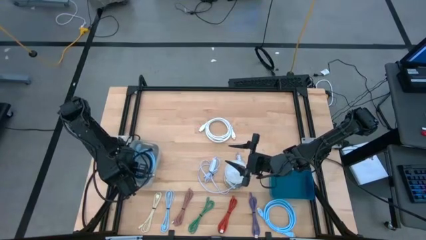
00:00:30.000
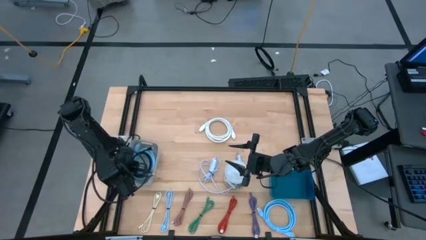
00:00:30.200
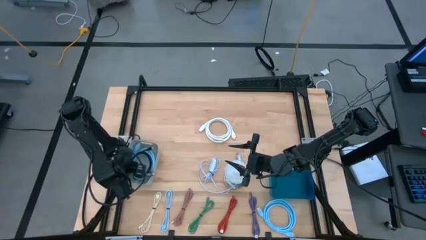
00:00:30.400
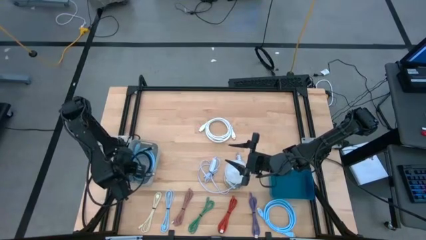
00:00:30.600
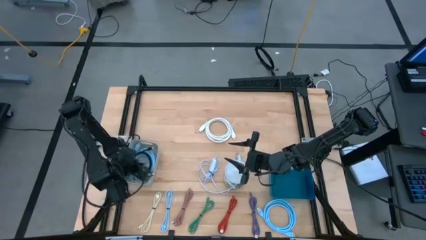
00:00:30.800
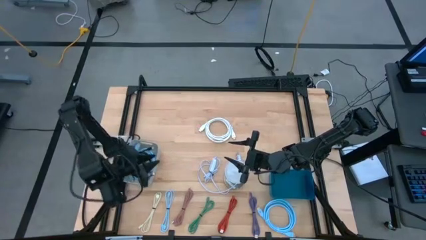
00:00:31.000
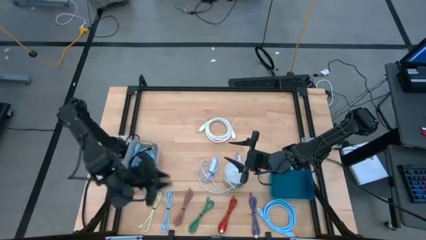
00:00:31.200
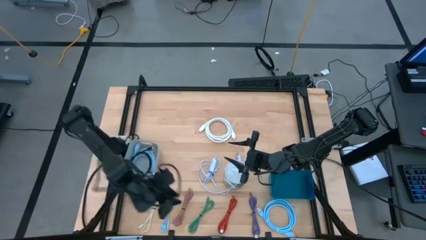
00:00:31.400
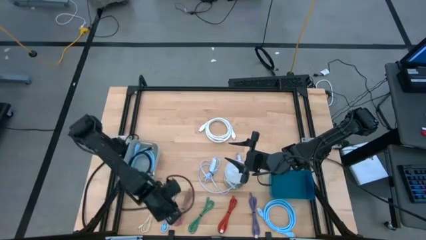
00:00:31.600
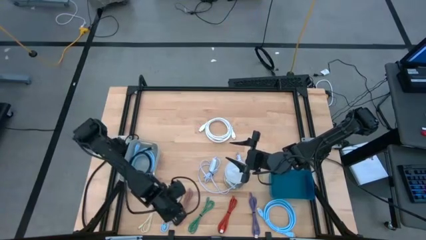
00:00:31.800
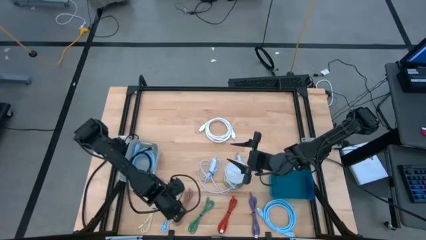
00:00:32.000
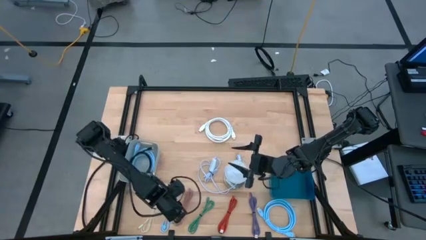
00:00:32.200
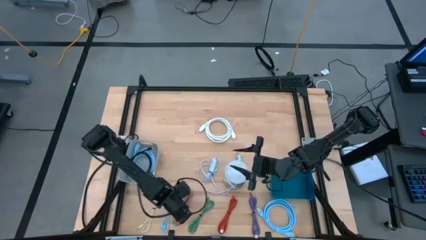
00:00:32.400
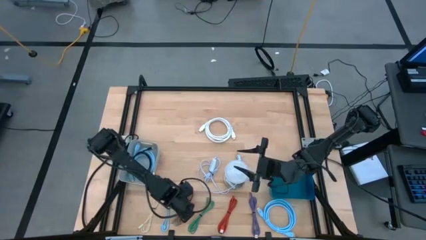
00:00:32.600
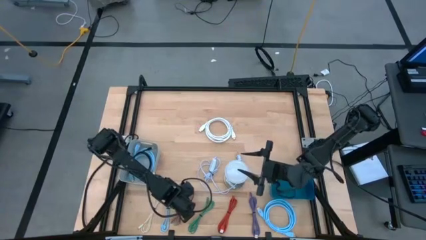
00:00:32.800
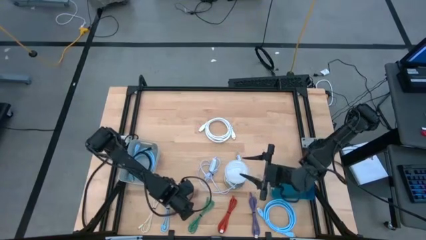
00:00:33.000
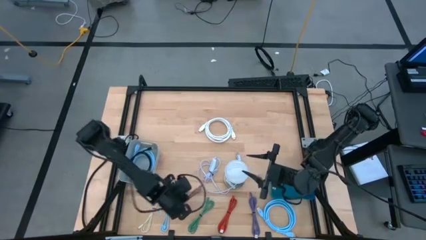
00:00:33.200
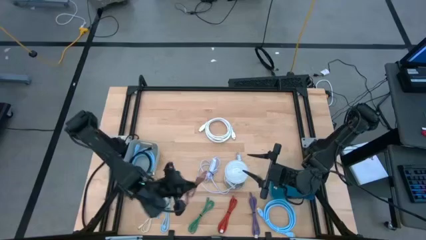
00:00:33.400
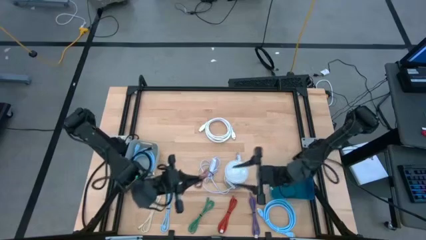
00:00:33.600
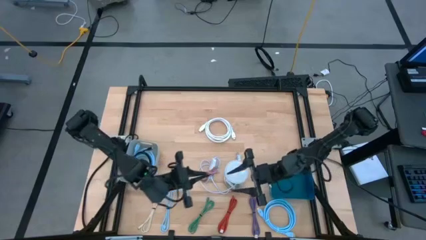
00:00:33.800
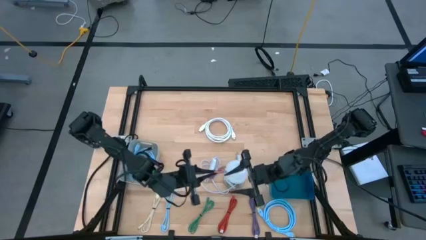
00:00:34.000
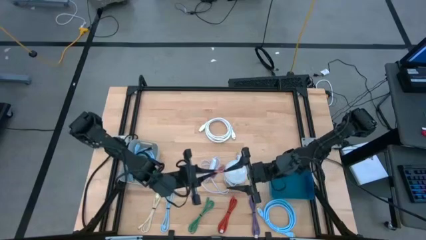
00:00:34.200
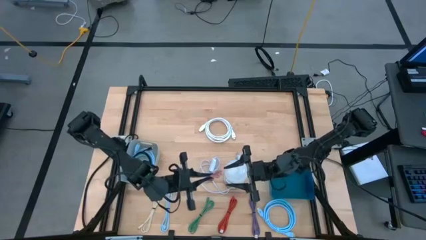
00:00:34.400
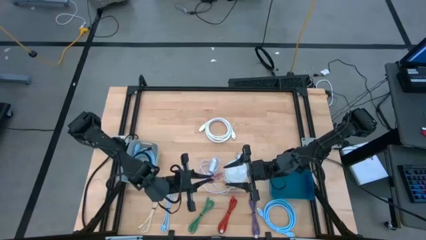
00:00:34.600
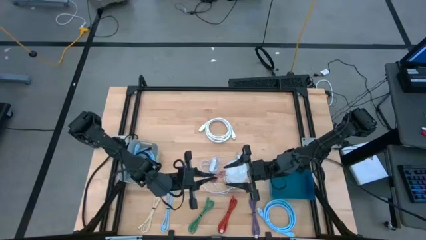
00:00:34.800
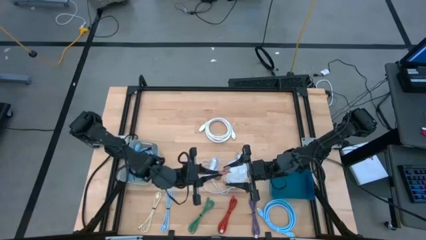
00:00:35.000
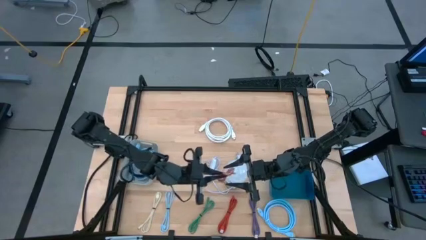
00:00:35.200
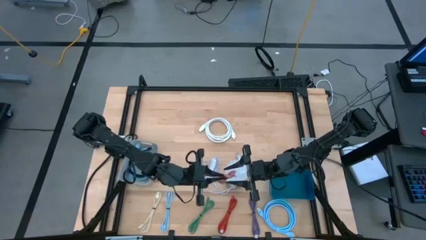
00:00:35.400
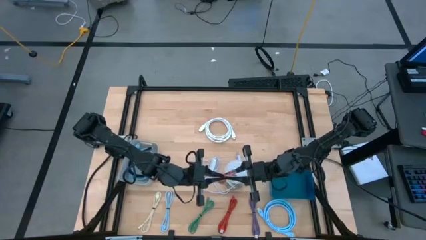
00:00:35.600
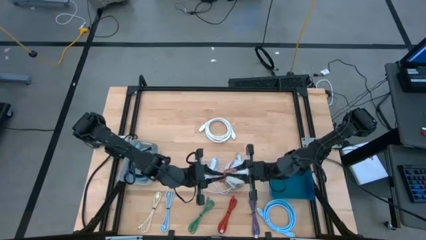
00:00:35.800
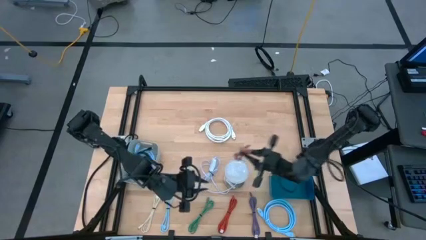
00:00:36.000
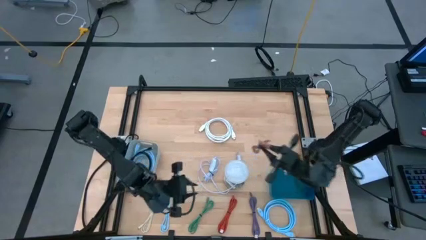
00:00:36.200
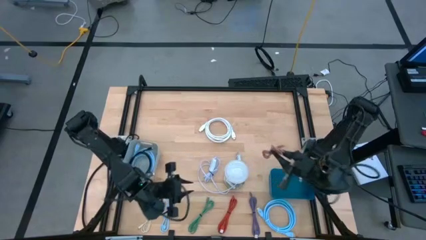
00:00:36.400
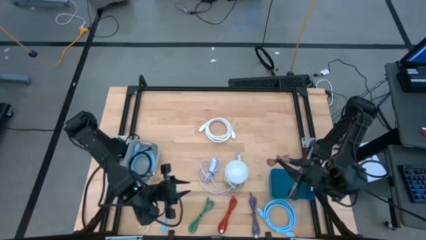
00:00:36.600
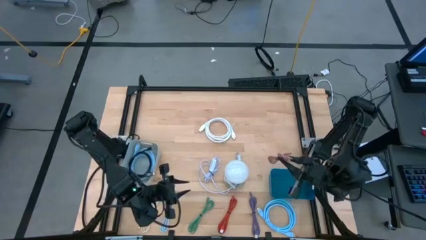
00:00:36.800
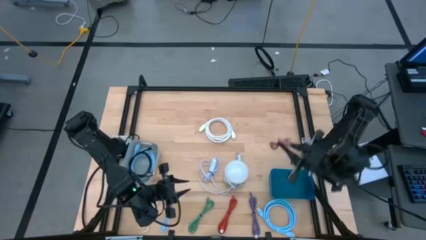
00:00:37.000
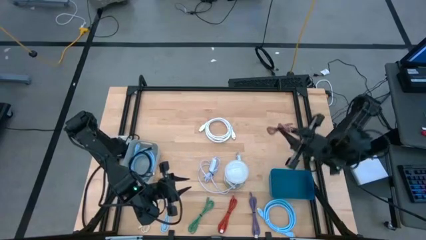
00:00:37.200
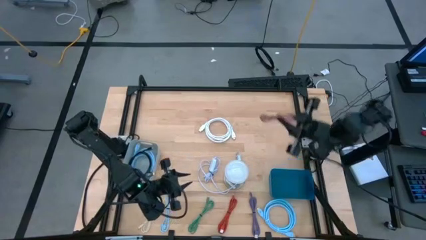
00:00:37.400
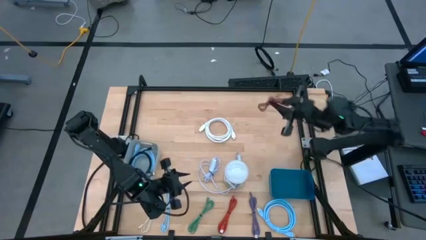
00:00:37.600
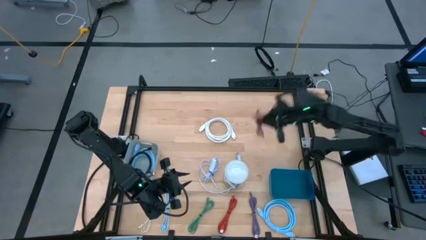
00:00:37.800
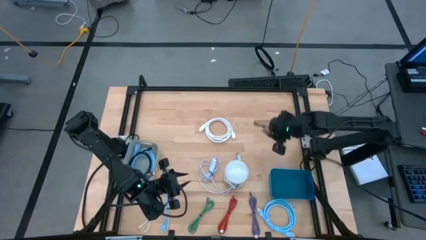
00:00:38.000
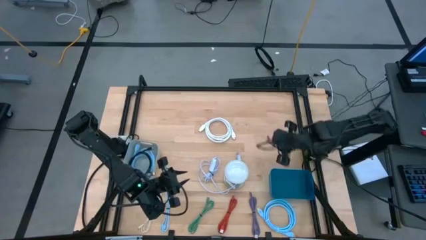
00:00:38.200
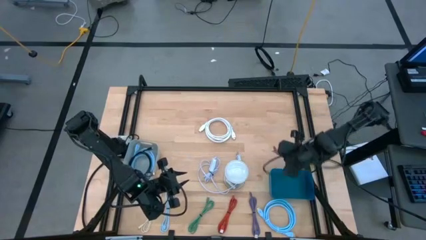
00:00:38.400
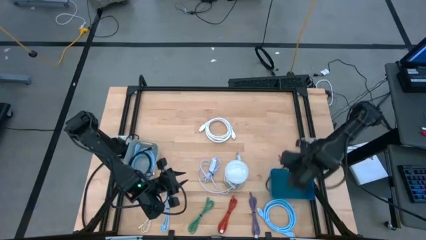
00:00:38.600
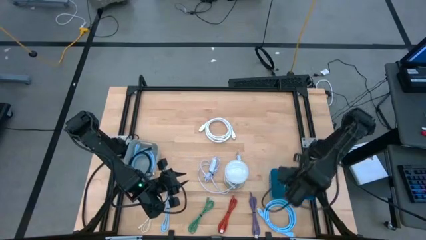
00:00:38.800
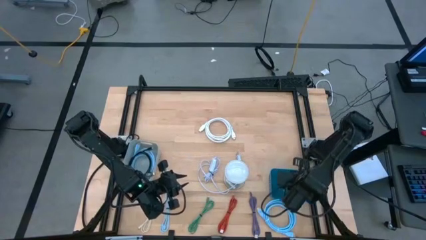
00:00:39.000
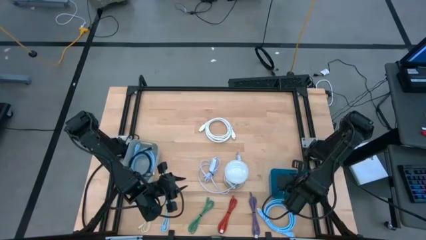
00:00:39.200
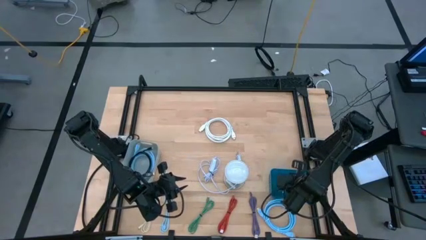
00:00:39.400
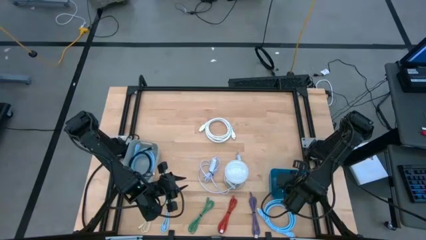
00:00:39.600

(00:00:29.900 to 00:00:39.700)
Task: Pick & Place USB Port
Put the pink USB cable into the blue bin

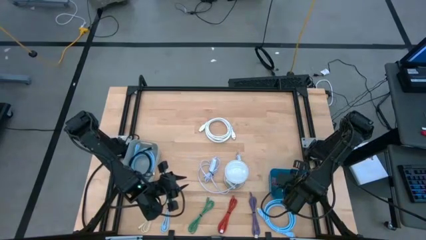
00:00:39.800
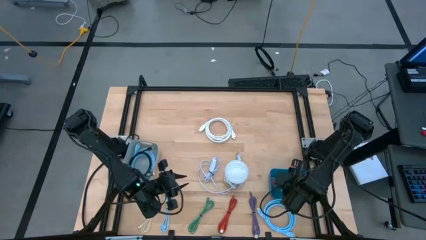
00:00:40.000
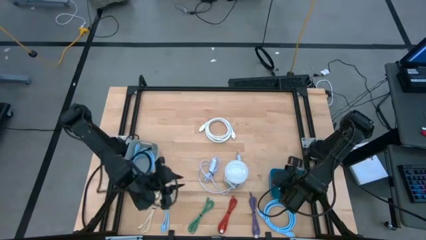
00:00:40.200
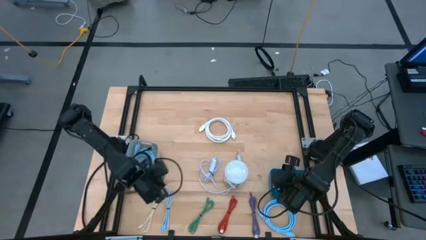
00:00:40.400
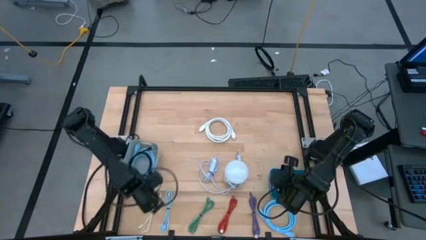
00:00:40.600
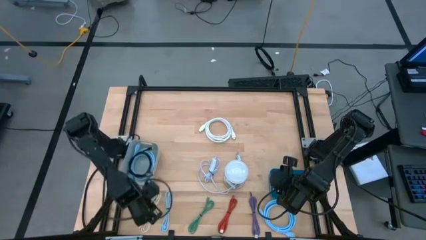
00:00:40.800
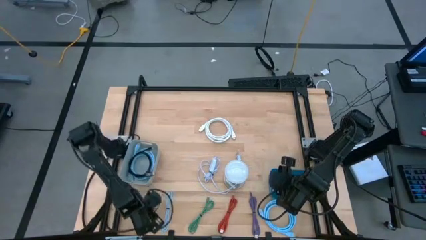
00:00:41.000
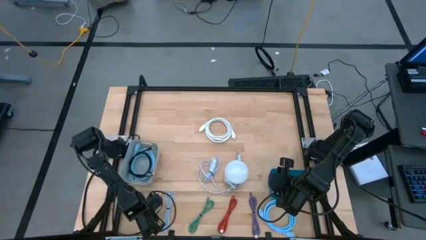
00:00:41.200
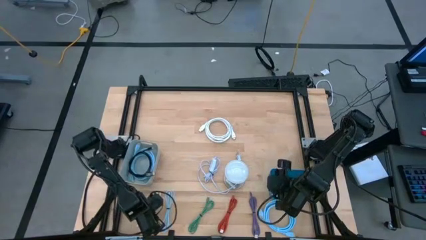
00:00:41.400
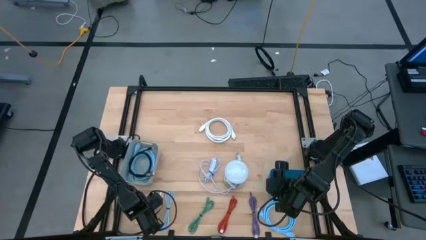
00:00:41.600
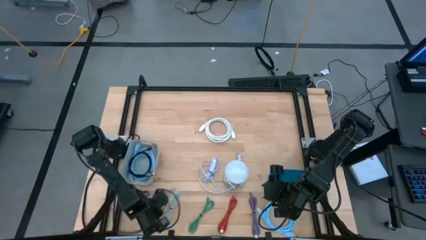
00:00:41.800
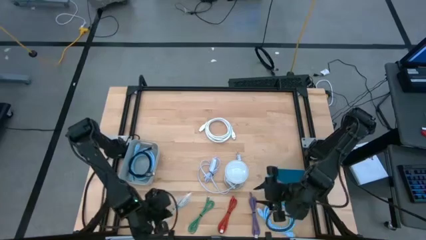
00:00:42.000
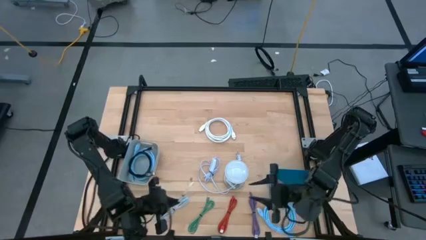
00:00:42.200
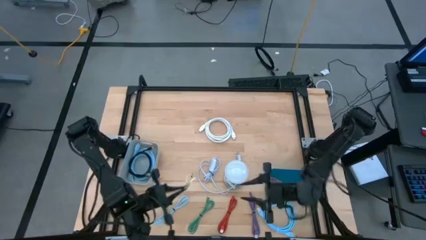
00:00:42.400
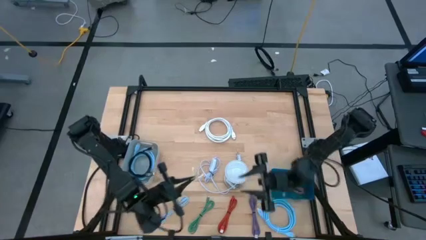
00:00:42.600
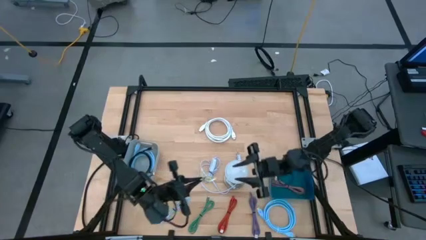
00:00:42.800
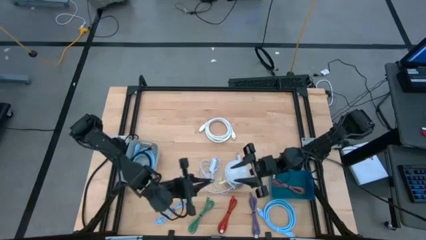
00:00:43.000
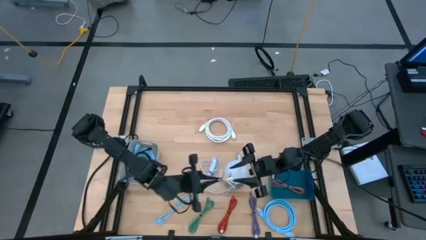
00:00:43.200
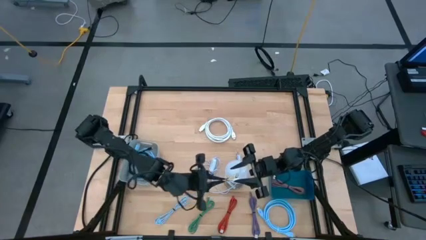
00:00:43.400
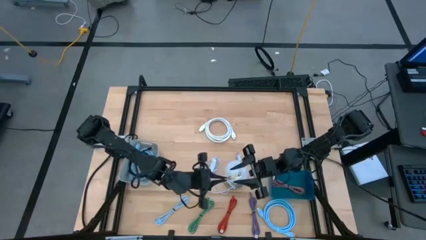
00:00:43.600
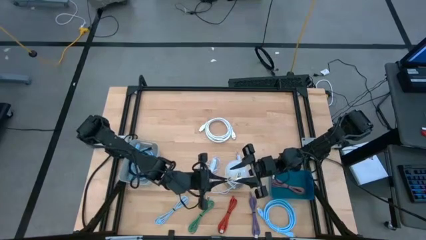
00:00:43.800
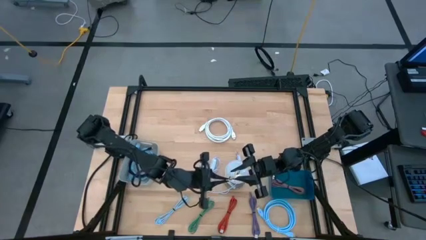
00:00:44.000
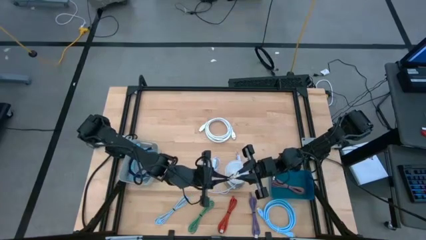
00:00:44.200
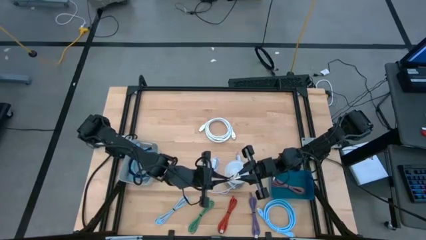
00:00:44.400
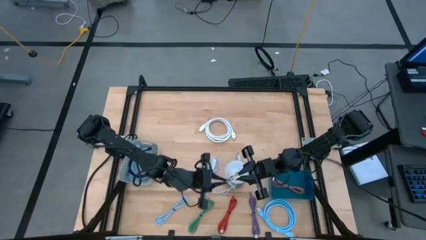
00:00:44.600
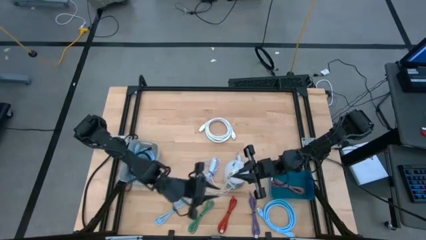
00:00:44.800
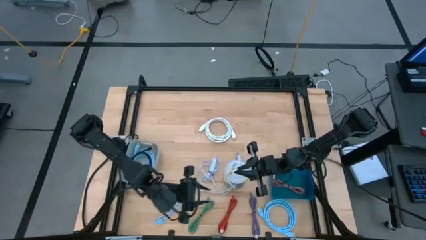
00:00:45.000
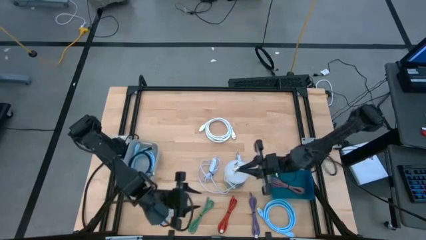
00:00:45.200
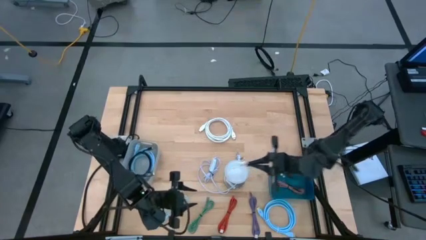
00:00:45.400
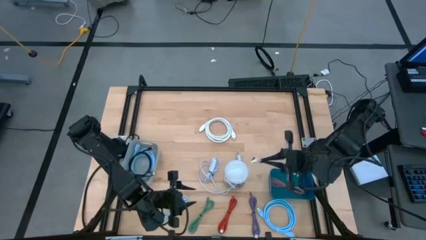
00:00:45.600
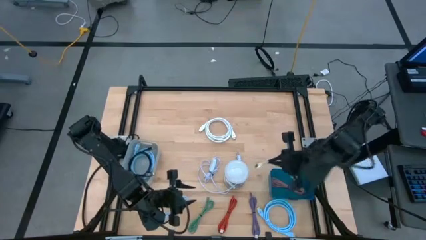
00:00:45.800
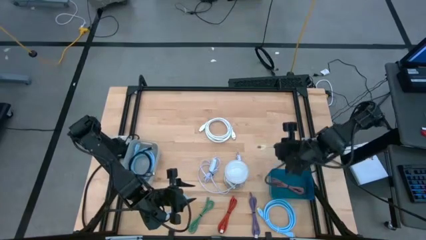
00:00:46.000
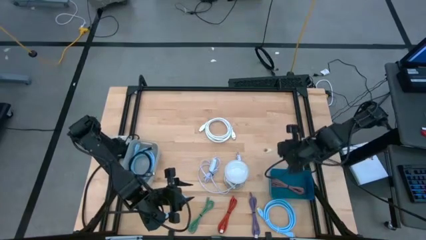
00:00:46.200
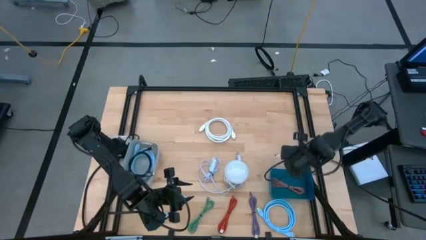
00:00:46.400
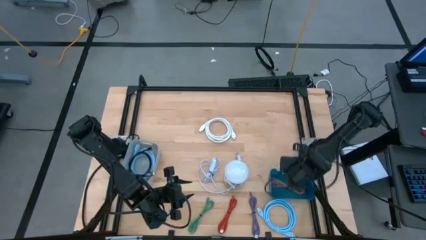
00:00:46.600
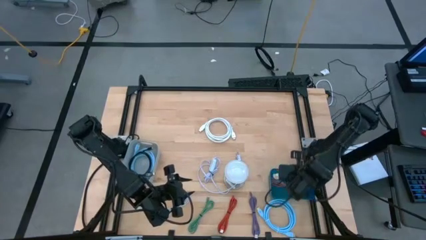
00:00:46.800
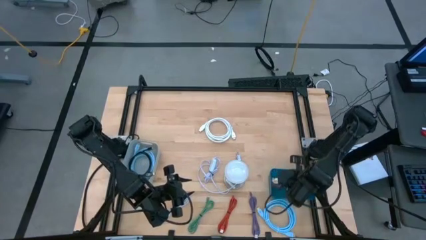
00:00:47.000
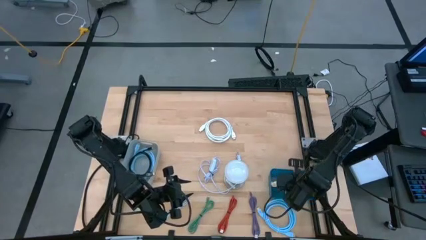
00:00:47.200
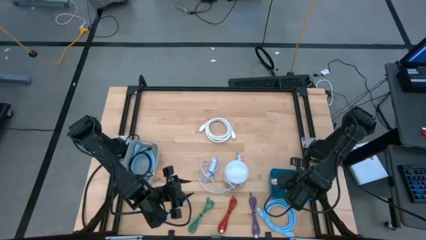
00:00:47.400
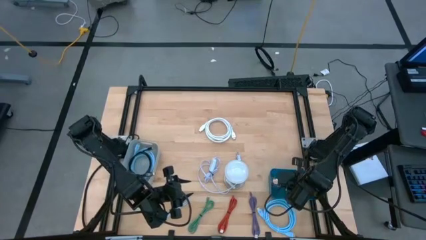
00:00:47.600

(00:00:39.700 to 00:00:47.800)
Put the white USB cable into the blue bin
